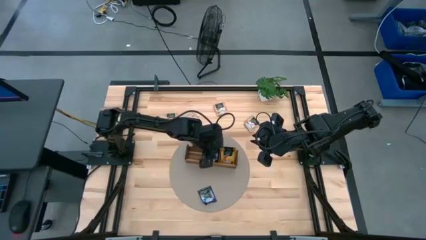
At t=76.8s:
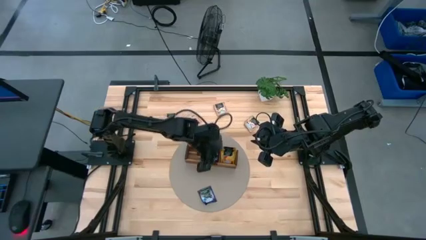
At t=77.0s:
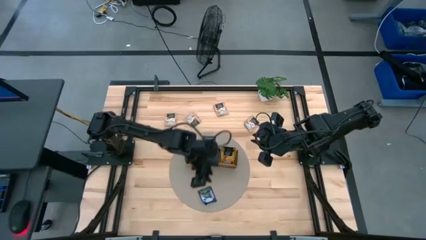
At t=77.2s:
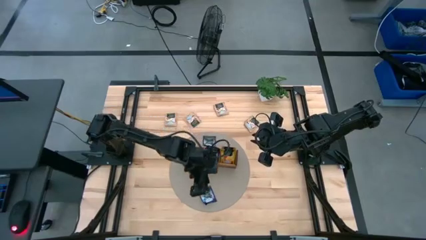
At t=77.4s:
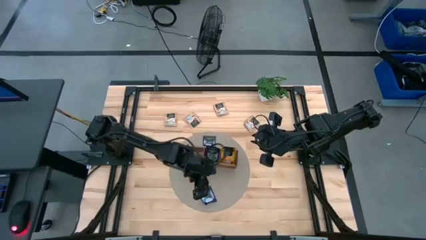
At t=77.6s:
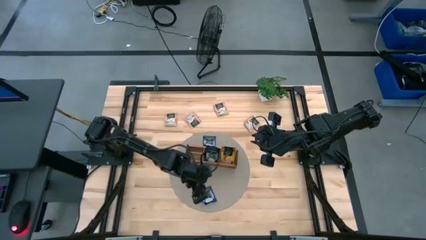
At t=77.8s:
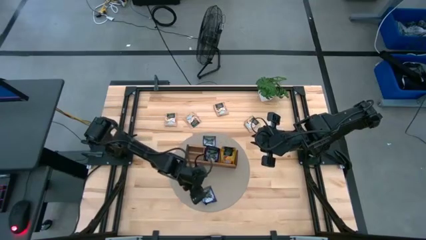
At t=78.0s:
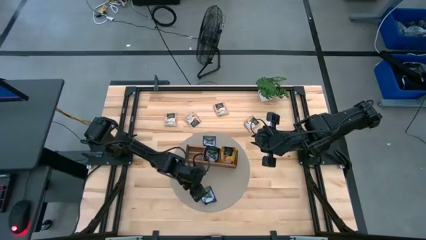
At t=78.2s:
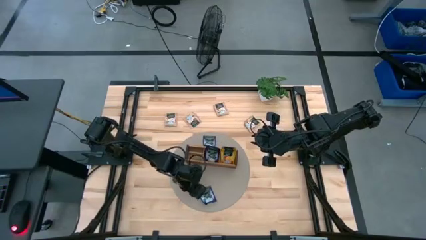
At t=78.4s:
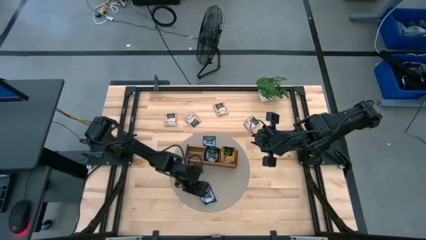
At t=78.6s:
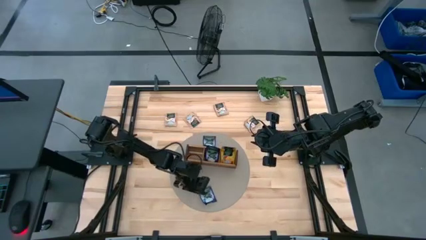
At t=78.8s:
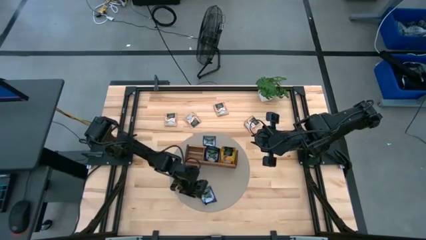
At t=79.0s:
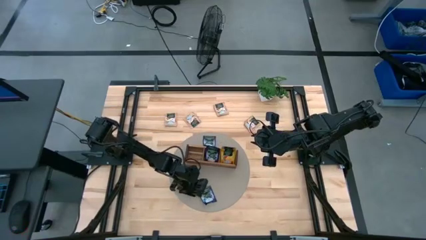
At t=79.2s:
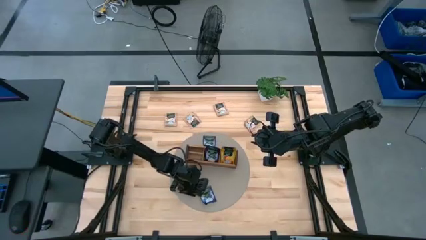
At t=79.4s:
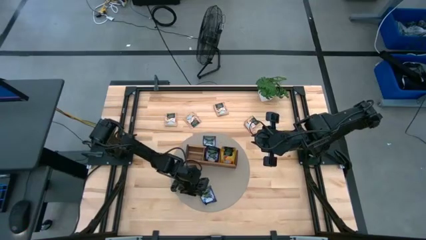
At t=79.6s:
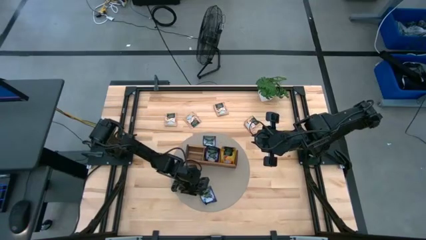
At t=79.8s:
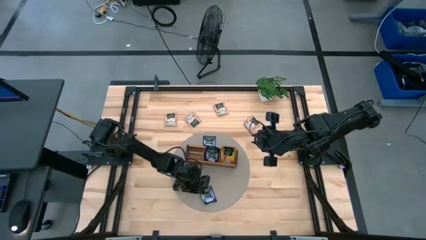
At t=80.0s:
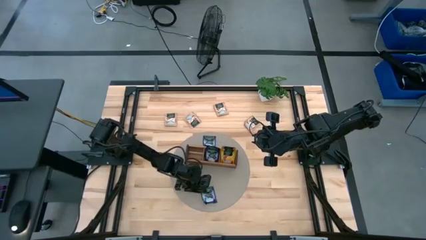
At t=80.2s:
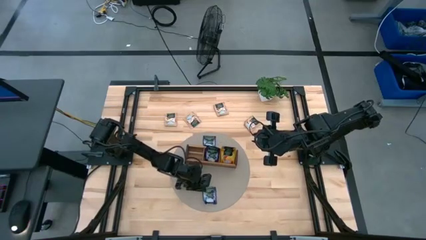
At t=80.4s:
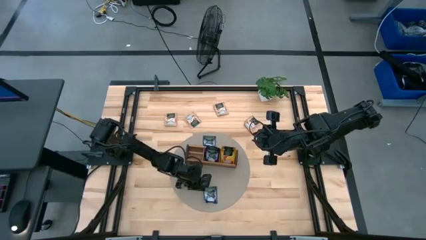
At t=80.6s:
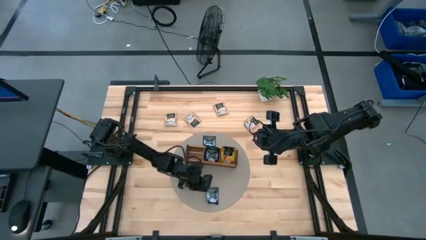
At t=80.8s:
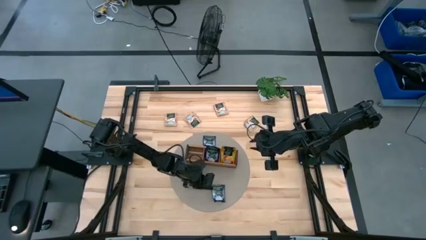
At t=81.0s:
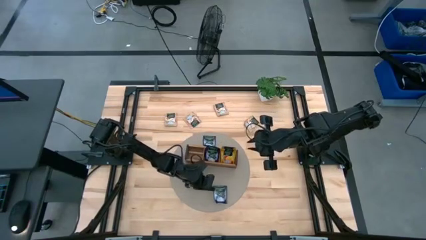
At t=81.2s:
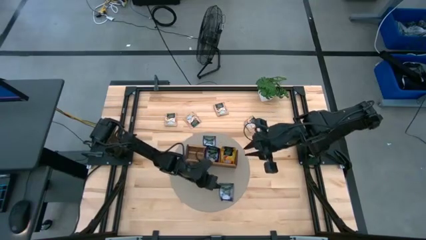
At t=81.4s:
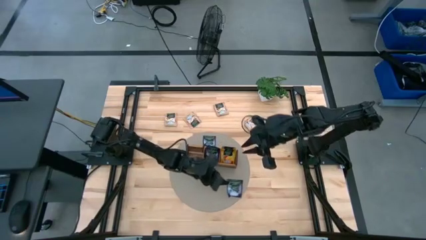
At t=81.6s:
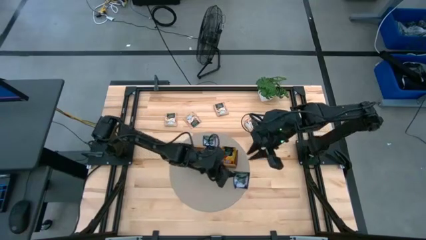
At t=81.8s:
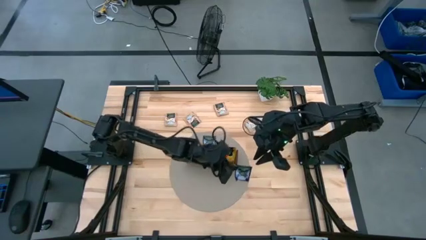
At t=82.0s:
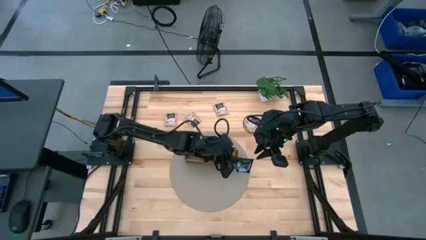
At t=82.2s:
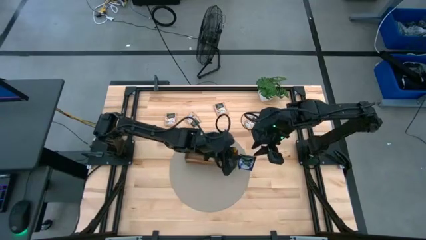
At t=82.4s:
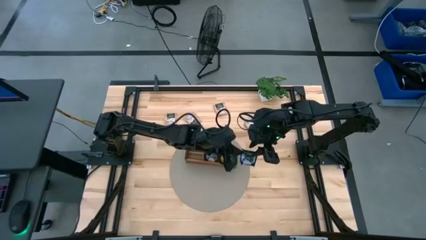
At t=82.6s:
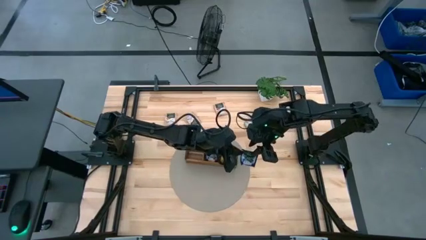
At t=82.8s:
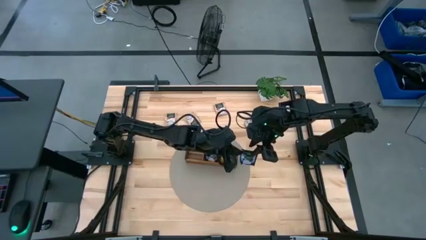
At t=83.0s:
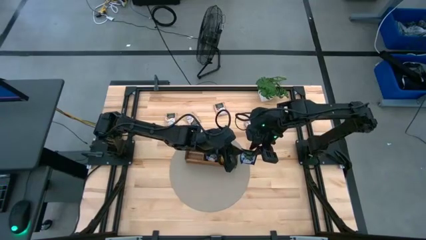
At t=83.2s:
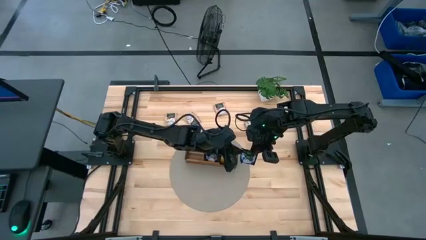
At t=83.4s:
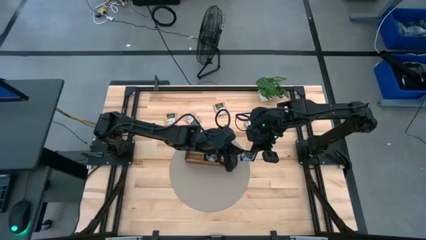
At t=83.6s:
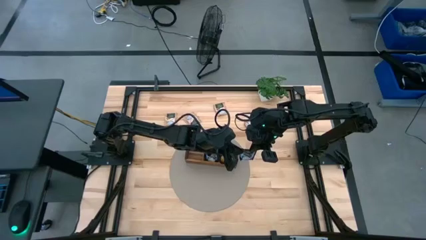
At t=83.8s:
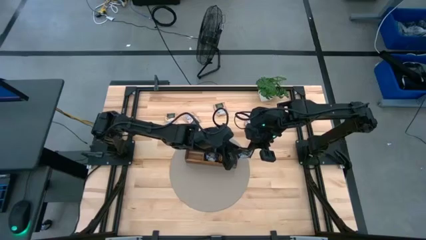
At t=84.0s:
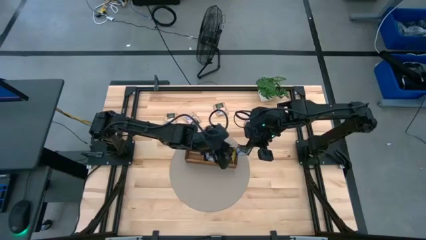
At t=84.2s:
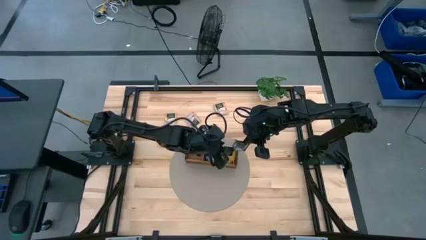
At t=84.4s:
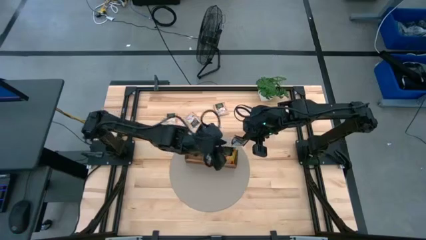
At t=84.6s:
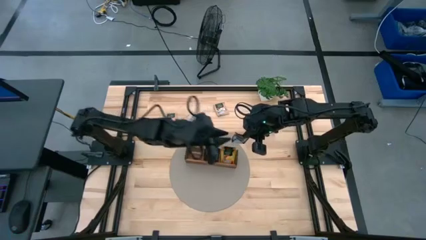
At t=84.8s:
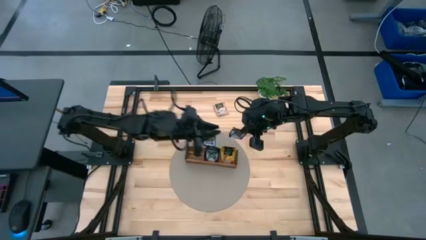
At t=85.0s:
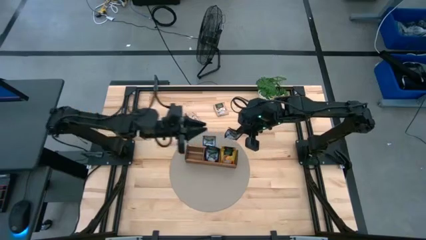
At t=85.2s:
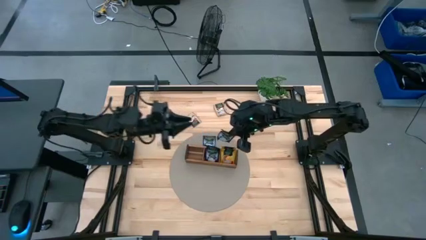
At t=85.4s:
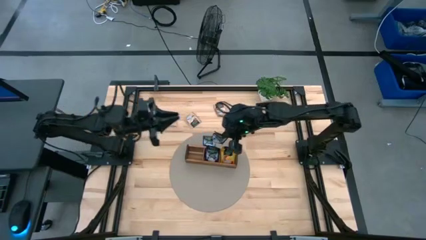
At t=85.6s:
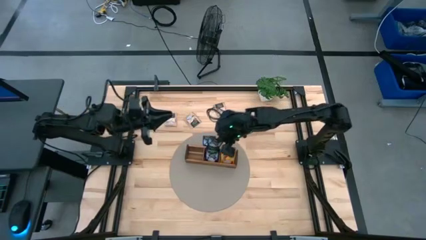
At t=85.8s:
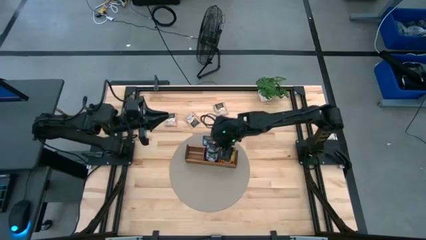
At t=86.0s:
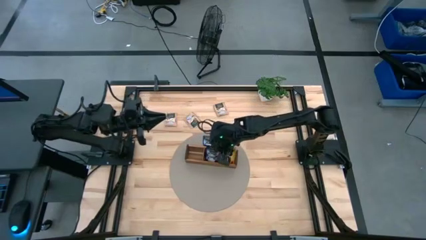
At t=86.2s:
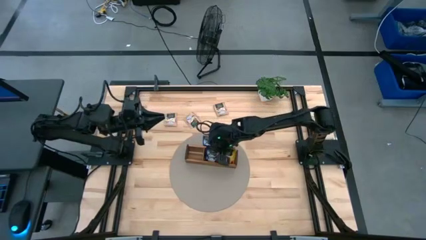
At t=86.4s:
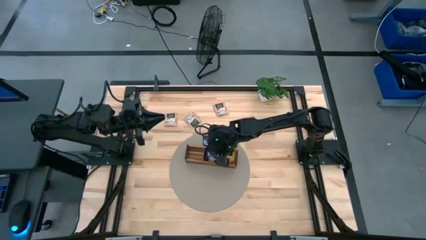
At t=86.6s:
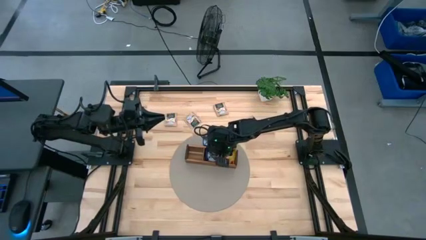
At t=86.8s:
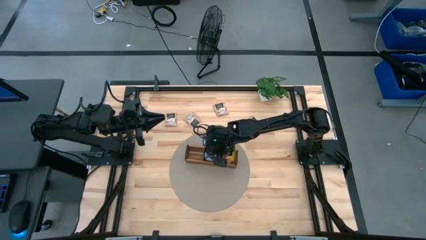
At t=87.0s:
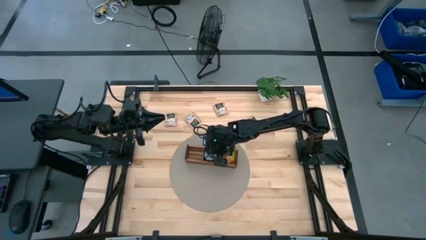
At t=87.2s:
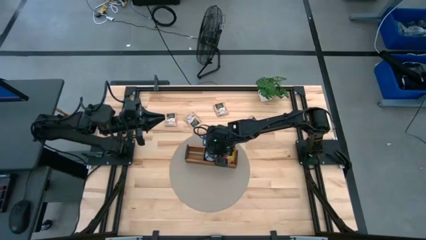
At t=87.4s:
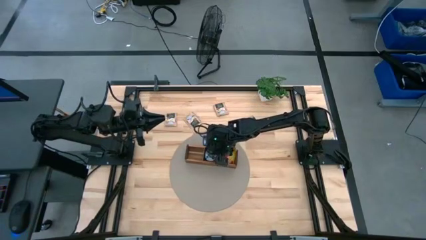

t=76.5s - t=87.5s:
Task: Pick & Place Tea
Put the purple tea bag into the middle section of the wooden organizer

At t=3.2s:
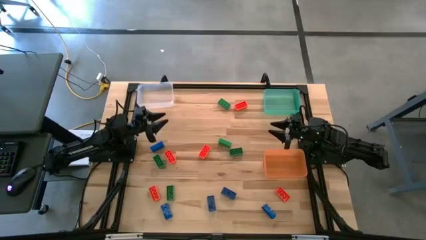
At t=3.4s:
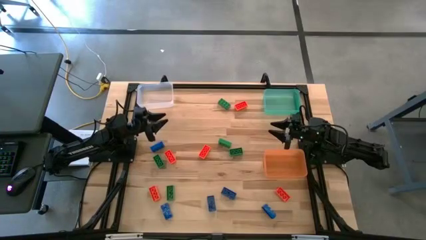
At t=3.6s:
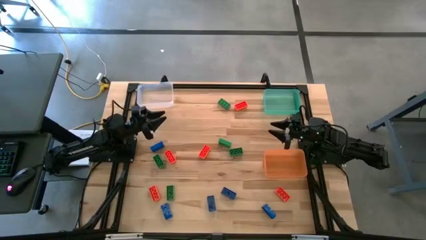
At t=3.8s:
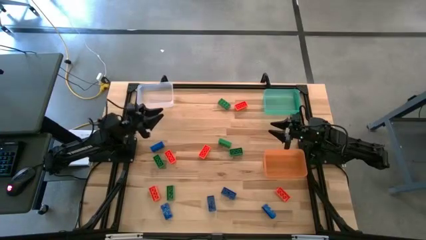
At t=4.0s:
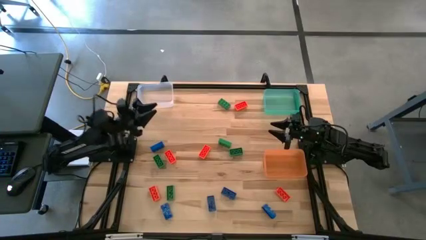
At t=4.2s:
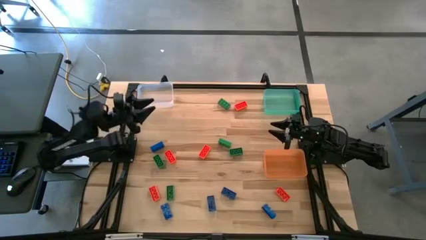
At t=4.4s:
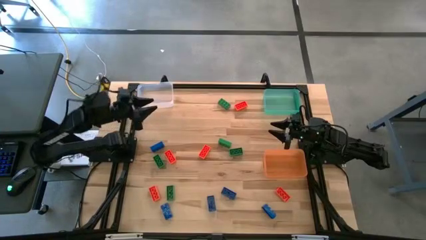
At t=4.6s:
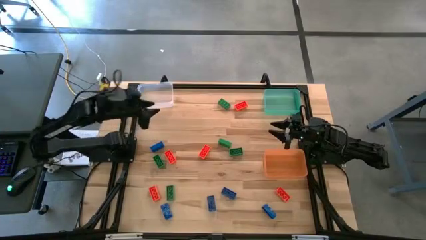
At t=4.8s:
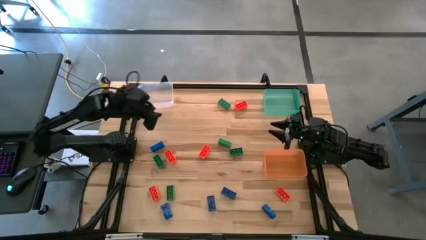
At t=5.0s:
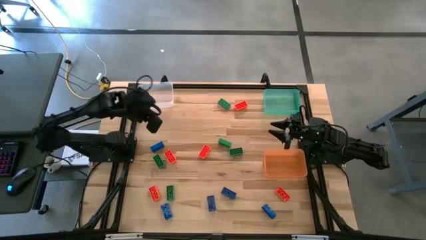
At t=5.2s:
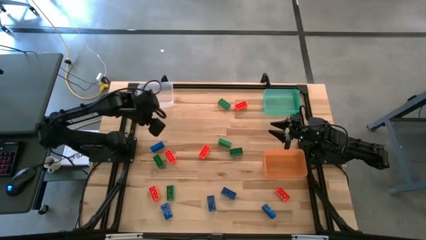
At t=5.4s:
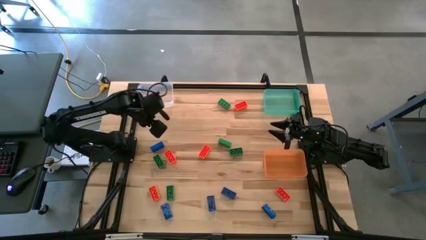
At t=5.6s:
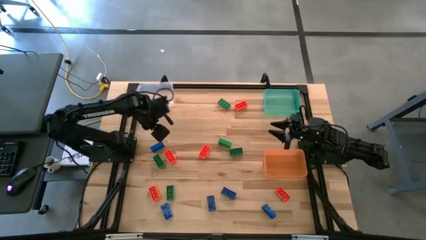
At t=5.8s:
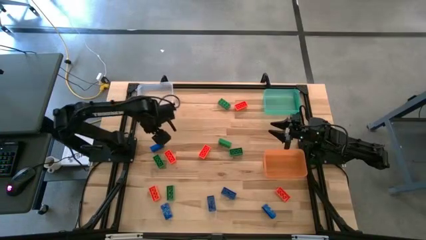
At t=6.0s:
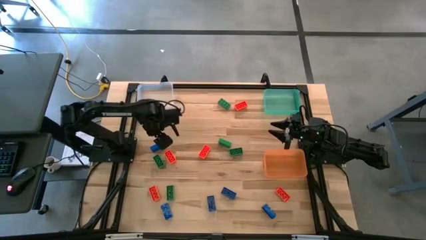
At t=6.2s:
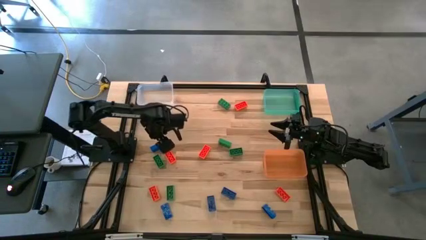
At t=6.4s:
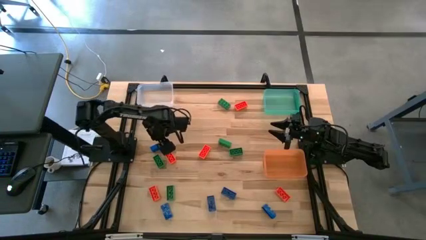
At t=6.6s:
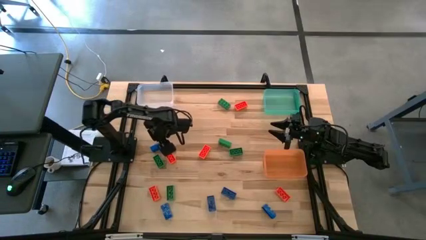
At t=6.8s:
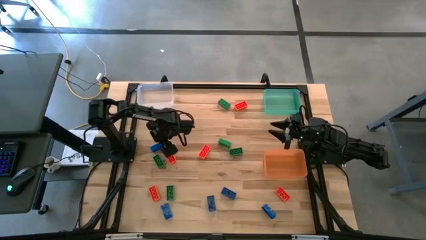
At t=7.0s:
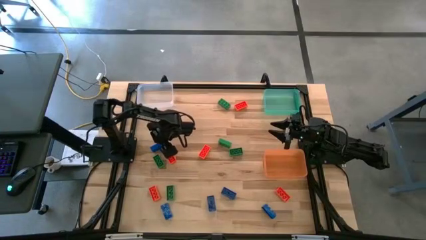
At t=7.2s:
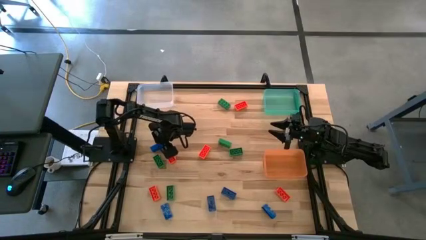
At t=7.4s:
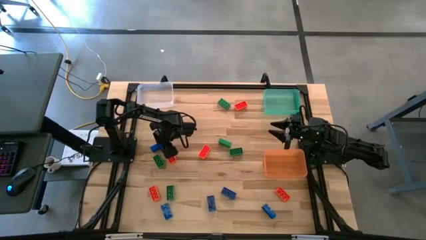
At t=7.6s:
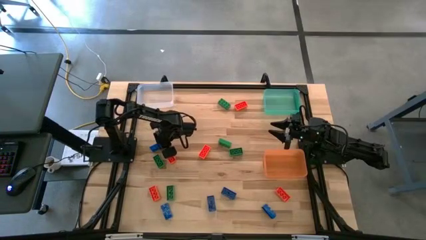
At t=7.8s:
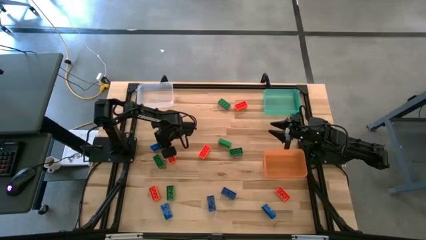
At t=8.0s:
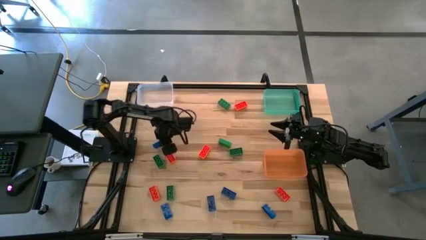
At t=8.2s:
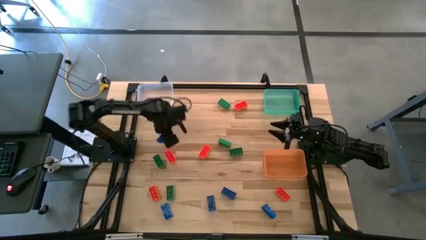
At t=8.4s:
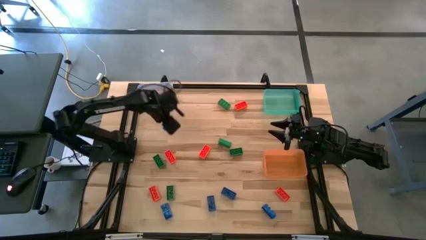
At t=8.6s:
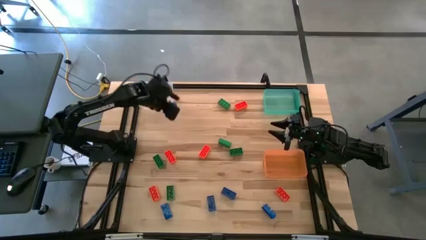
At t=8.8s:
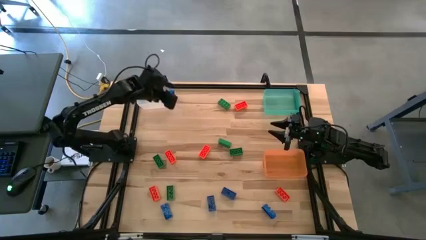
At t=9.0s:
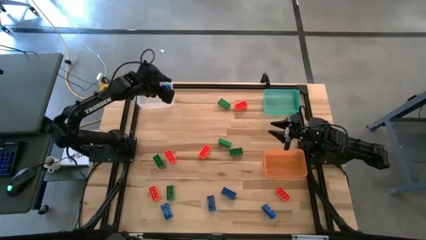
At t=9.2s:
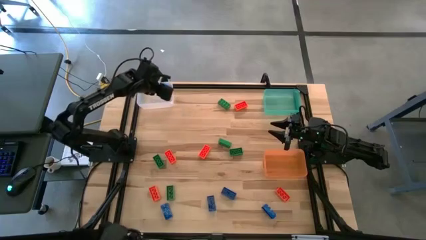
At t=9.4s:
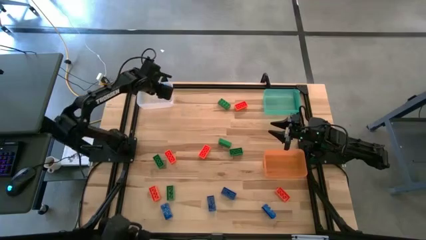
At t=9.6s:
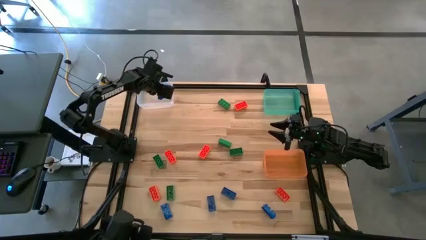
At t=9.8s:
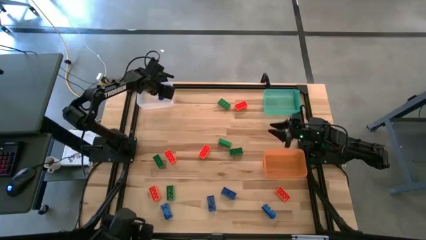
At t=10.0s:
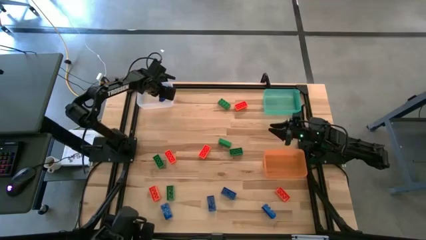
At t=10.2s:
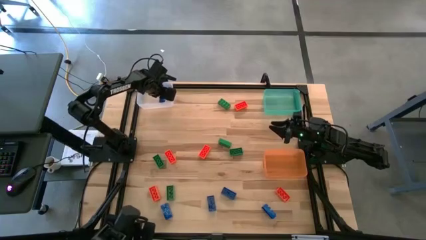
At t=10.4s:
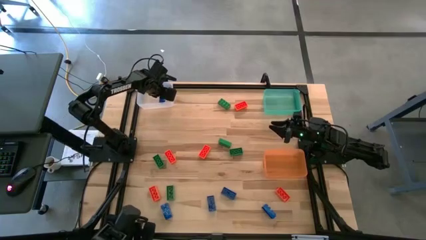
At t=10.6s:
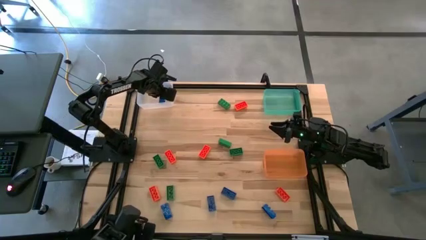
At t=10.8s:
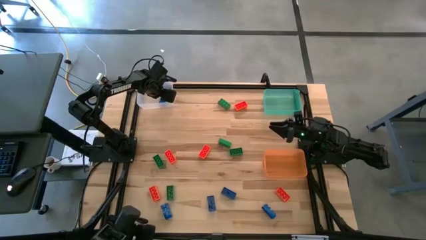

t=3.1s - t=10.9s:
Task: Sort & place blocks by color
Put the blue game piece into the transparent bin
